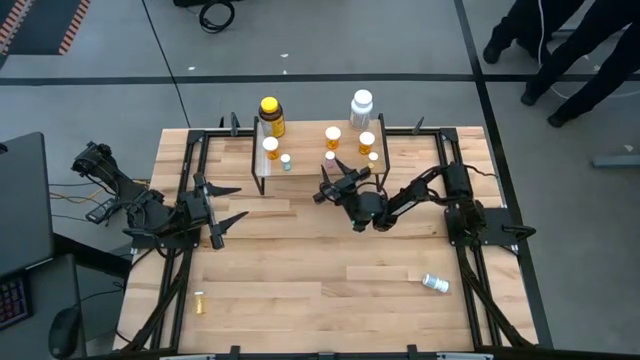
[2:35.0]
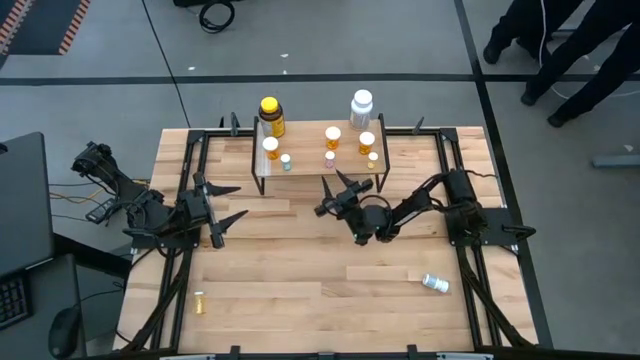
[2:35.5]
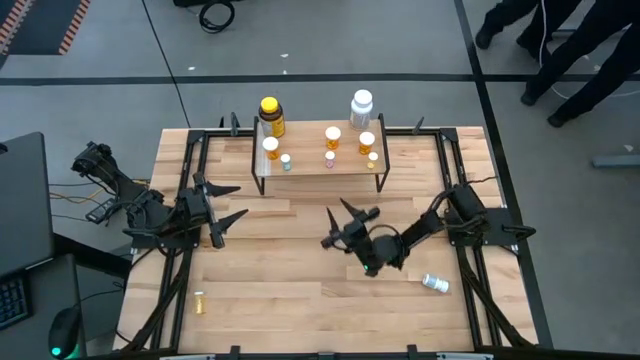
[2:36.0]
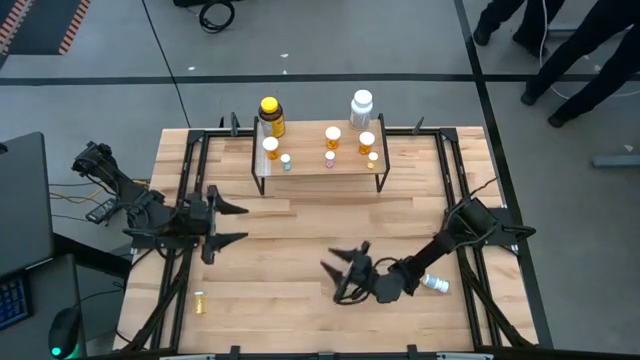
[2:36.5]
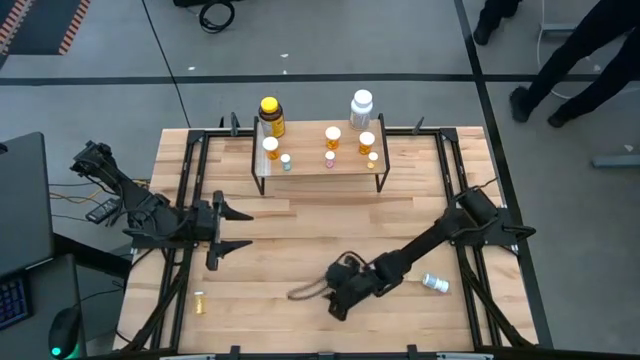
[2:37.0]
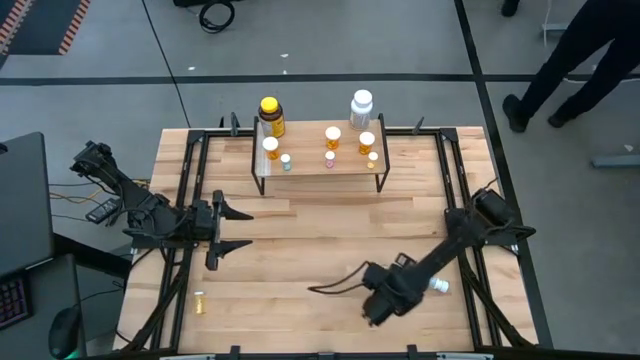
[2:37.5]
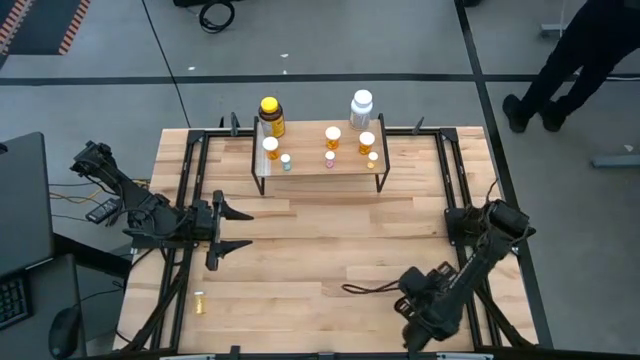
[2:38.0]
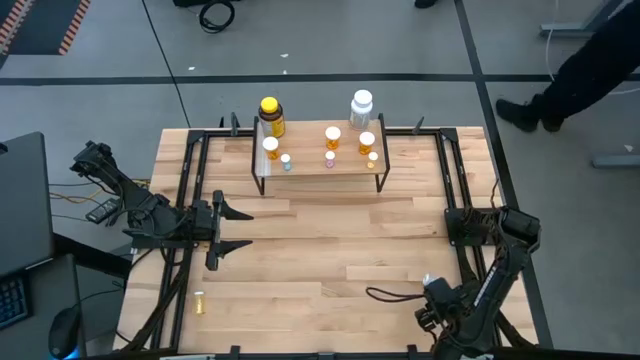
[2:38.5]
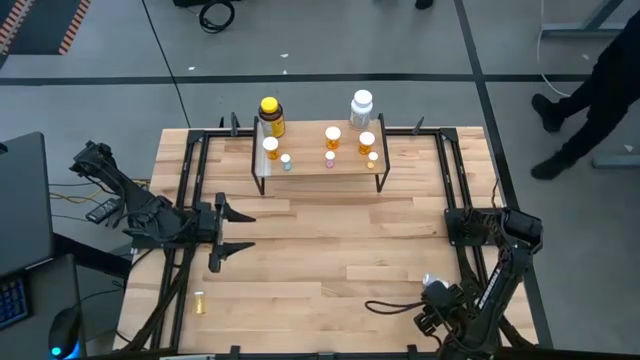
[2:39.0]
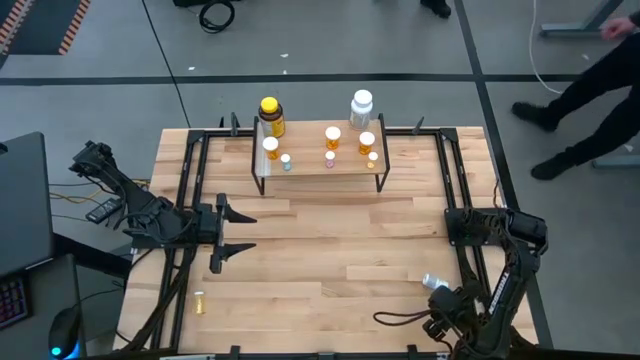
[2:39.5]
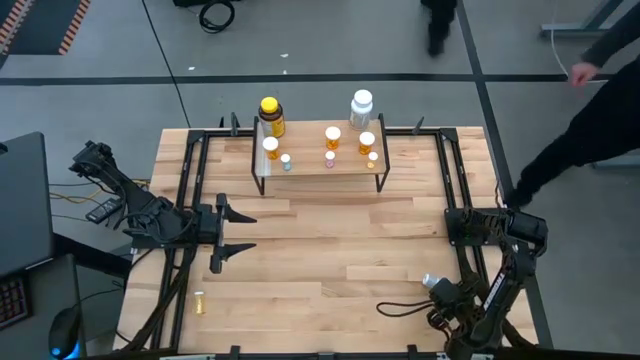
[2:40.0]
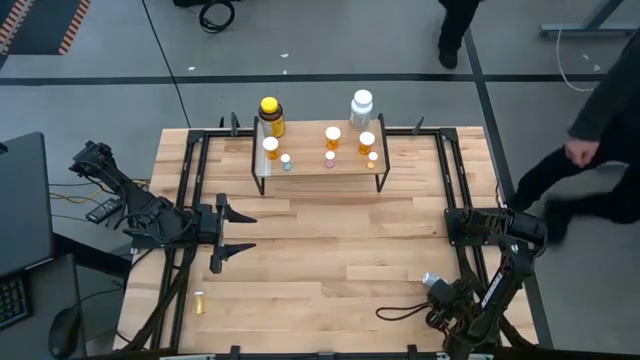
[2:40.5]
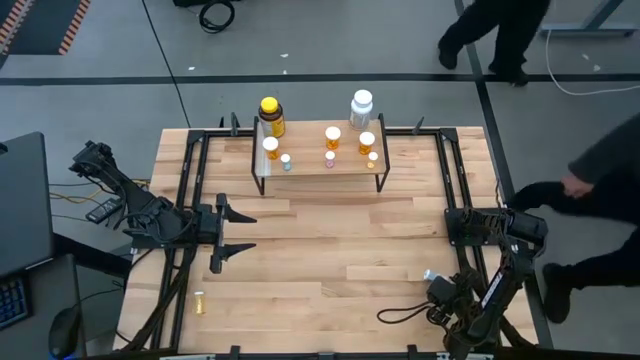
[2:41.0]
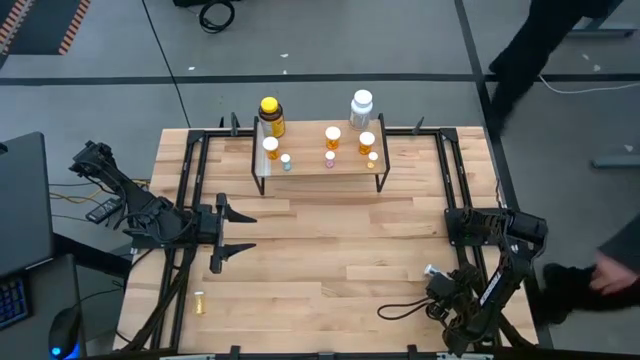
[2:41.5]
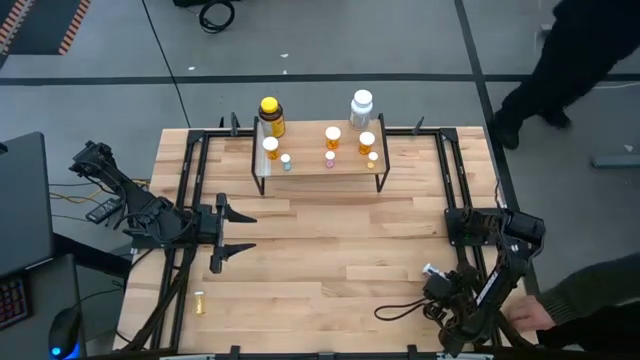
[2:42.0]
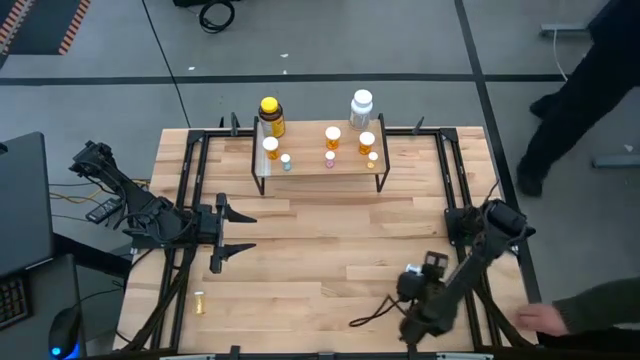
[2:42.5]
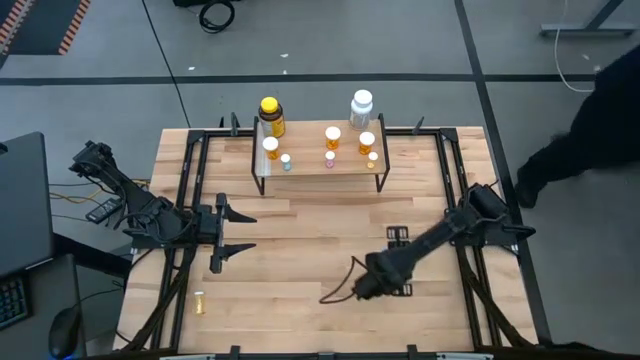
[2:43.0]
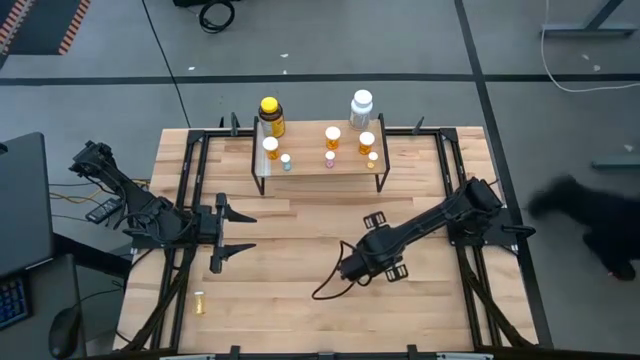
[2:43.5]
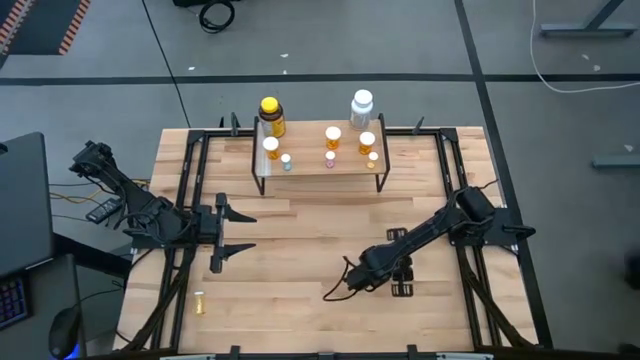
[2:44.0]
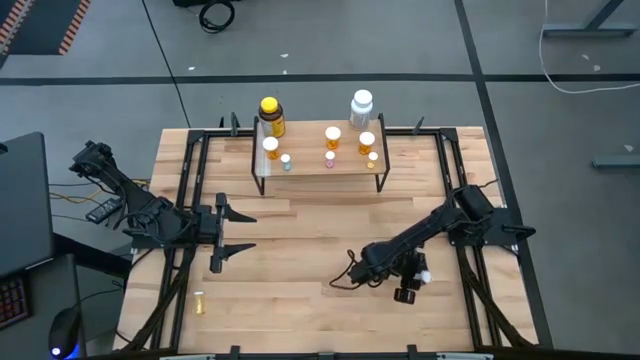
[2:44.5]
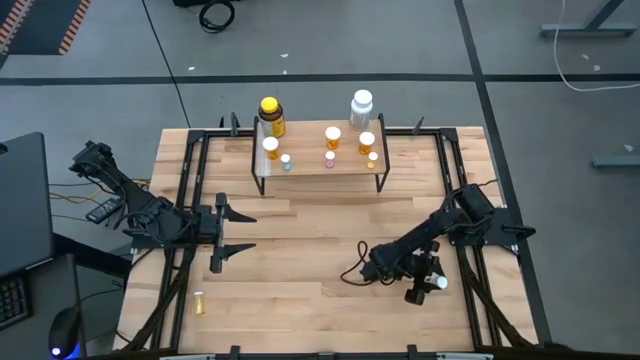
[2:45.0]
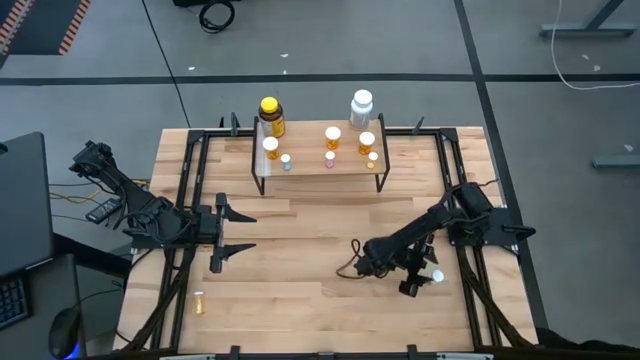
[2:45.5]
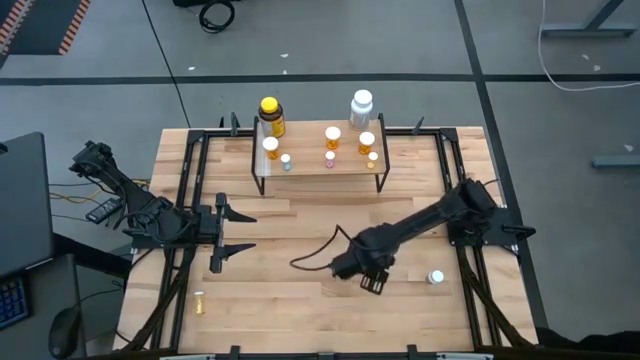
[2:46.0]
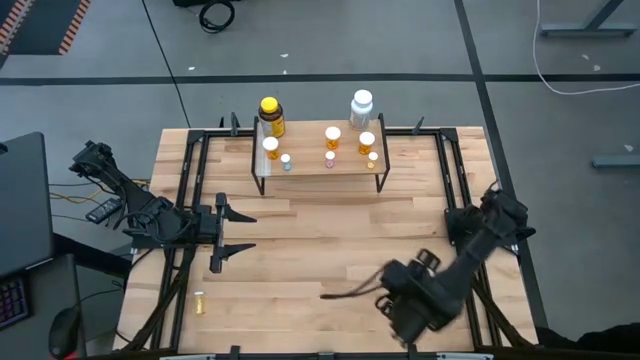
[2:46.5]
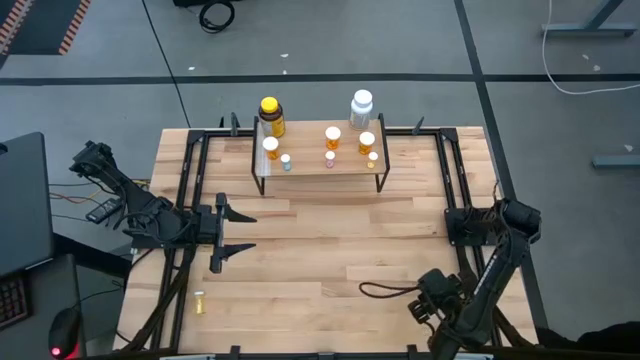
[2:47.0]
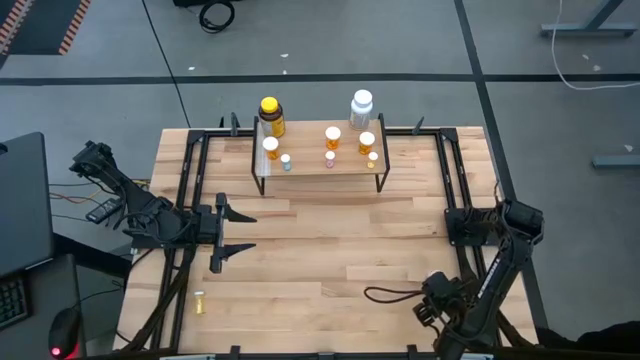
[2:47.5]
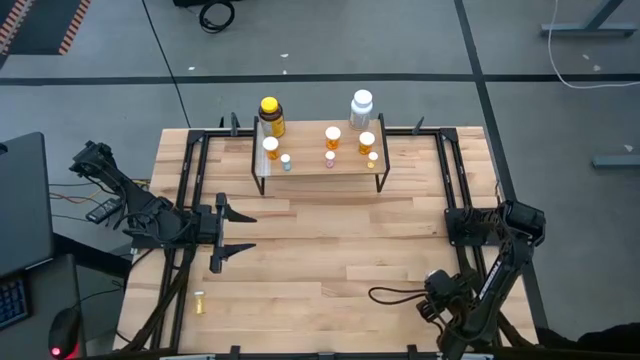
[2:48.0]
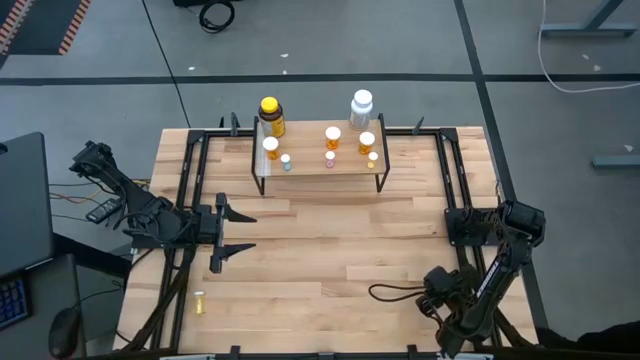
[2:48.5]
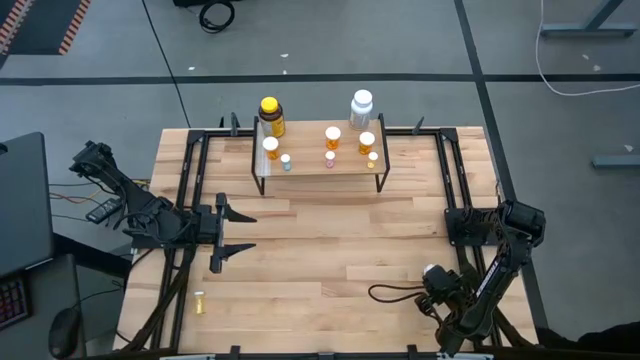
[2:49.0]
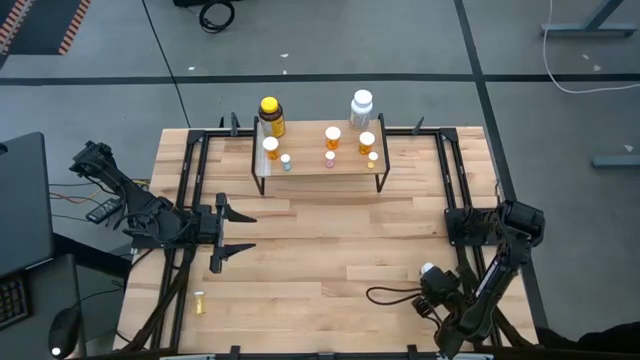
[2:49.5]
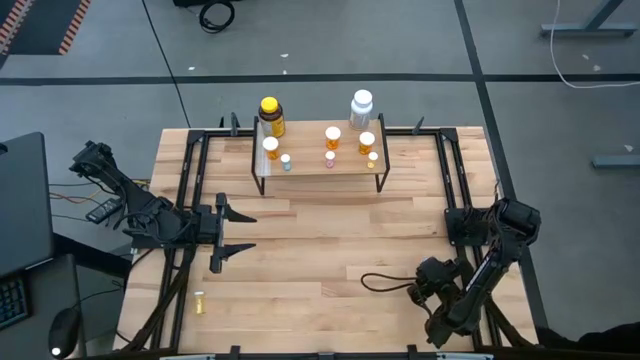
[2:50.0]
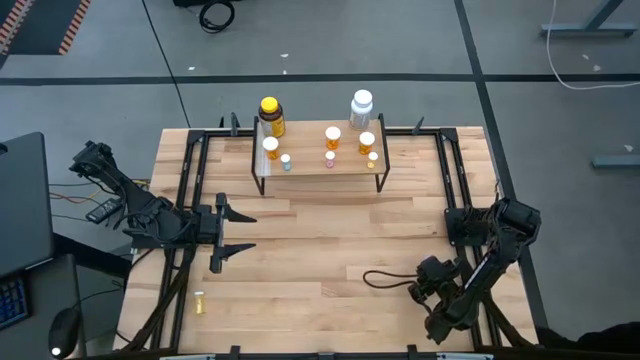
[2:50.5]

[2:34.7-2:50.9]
Task: Pick and place medicine bottles onto shelf by color
Put the small white pill bottle on the shelf

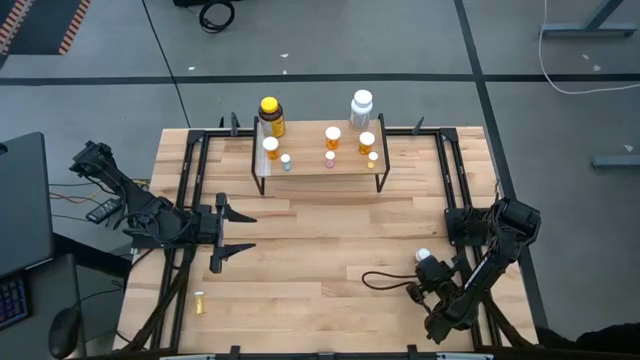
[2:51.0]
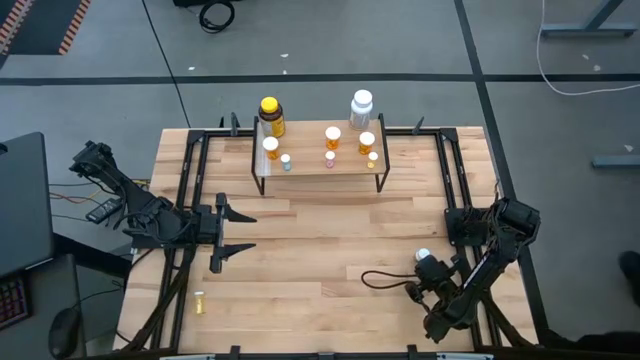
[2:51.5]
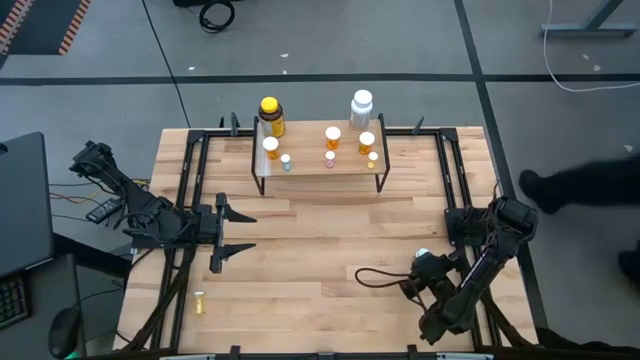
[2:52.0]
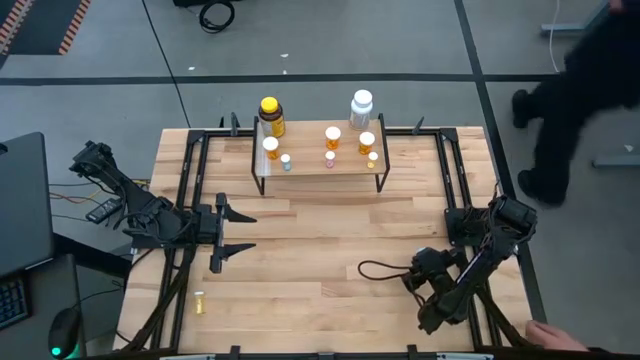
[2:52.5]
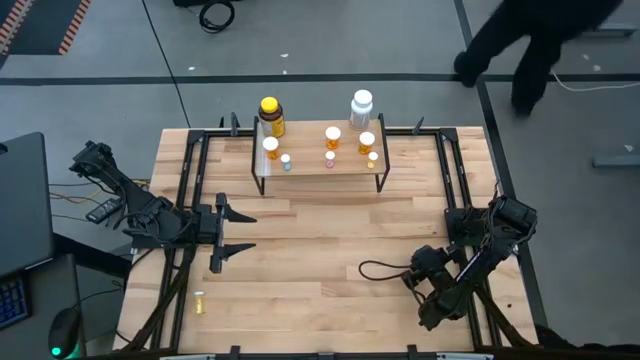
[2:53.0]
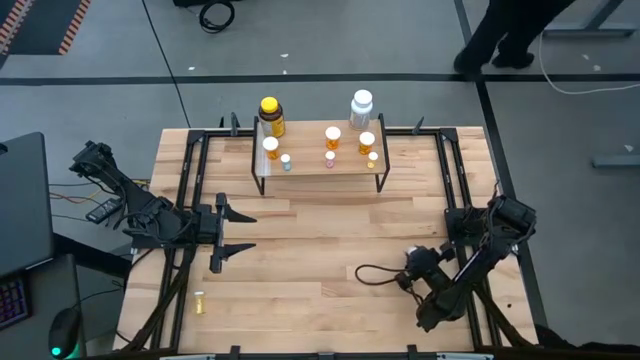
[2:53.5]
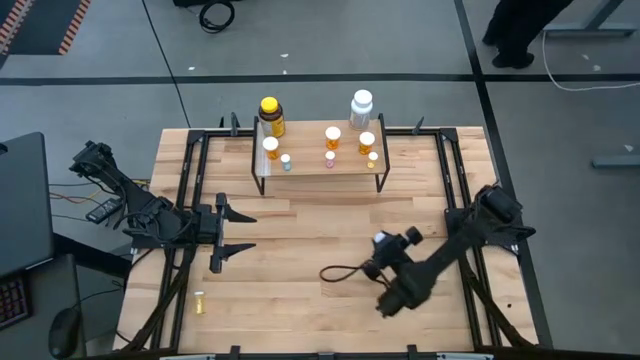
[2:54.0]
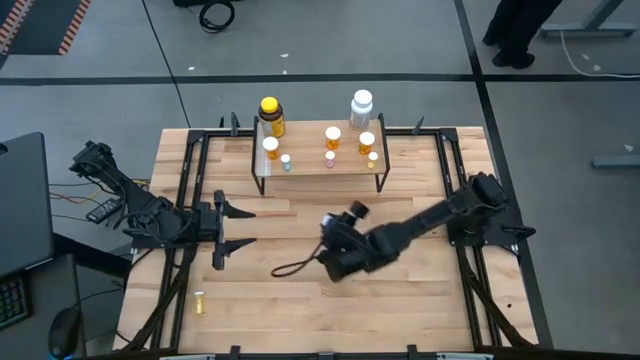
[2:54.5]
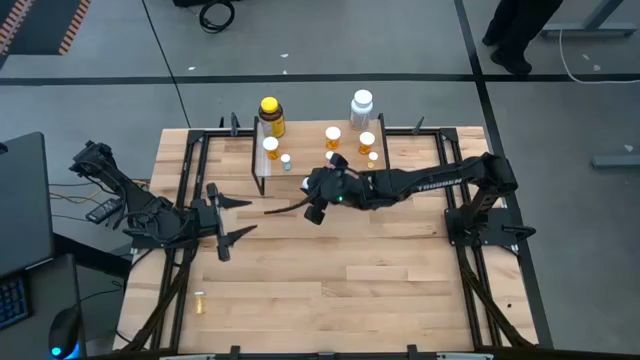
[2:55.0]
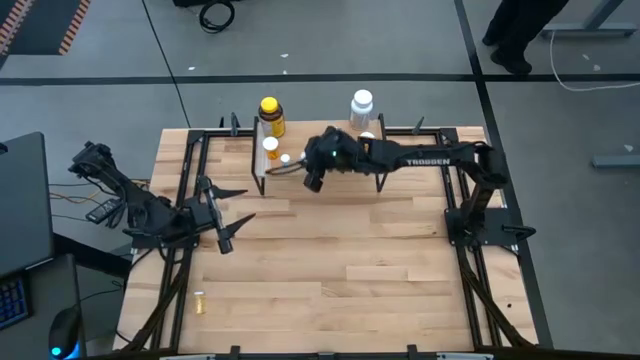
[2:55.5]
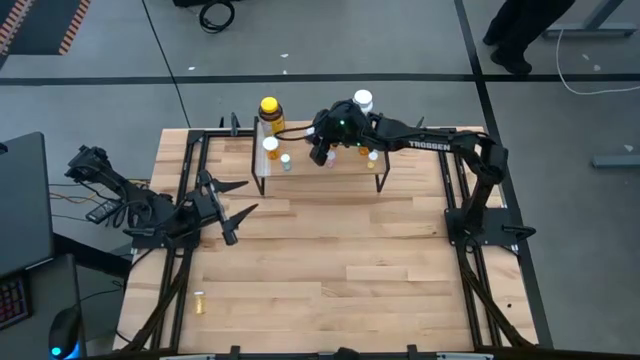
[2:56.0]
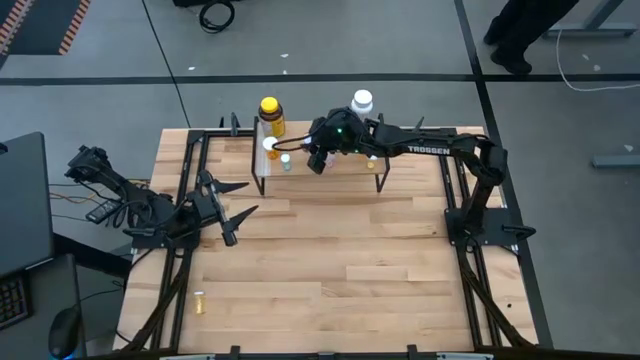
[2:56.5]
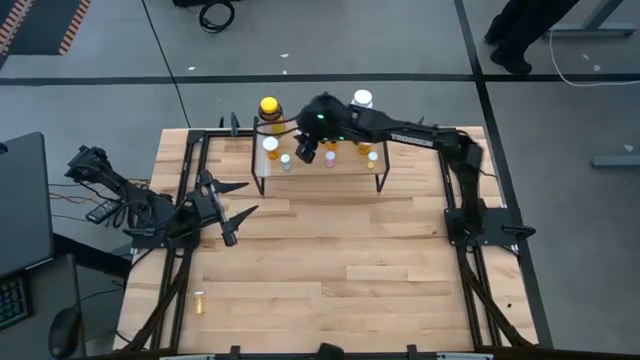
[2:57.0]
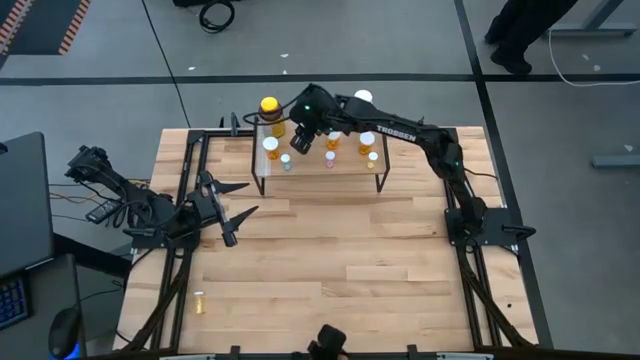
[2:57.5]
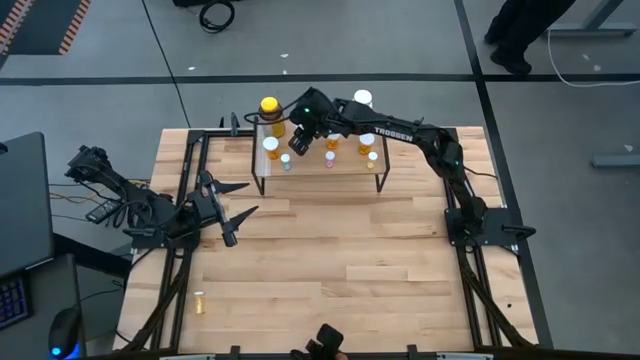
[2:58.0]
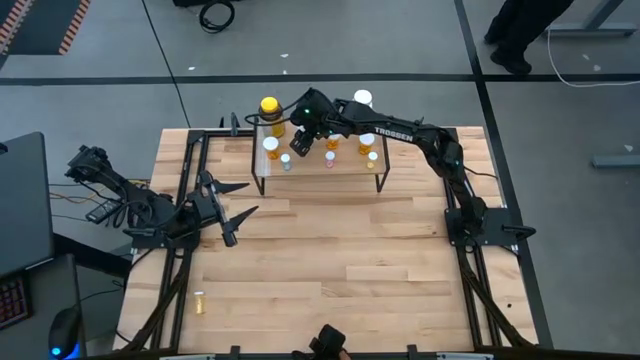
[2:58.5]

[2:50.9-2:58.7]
Put the small white pill bottle on the shelf
